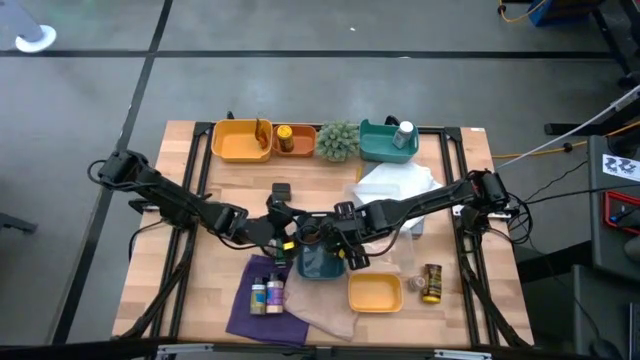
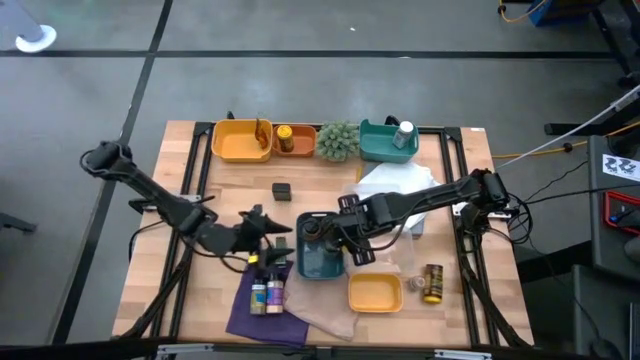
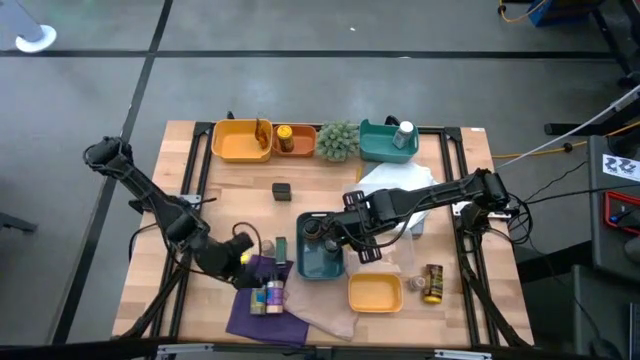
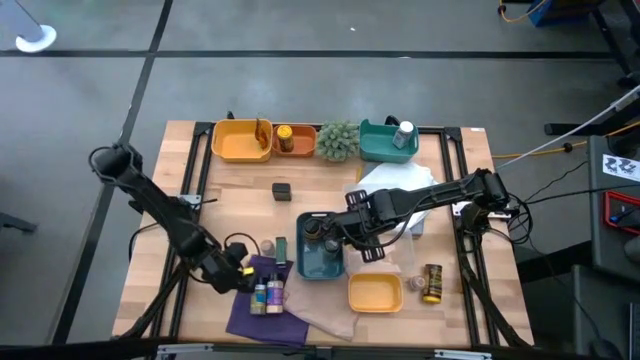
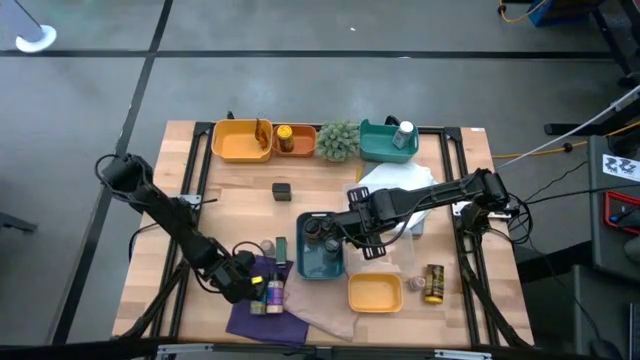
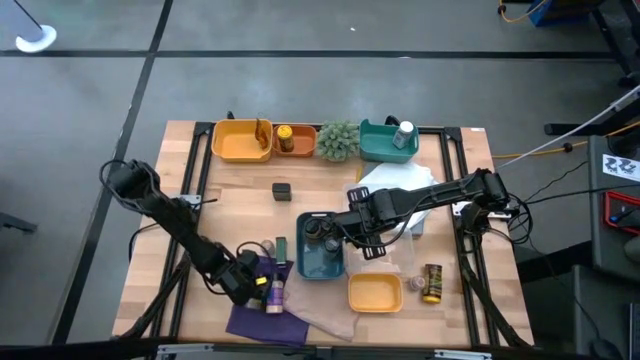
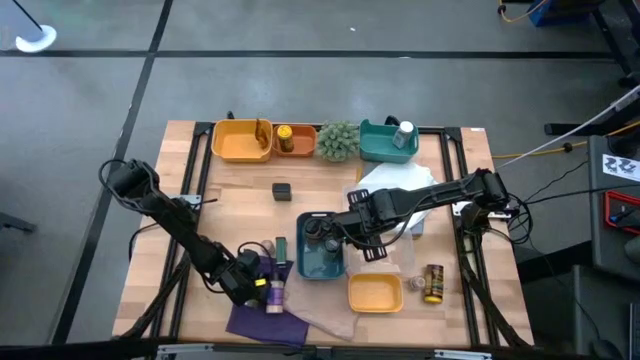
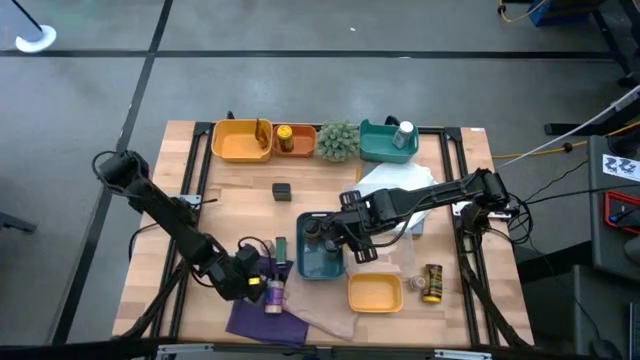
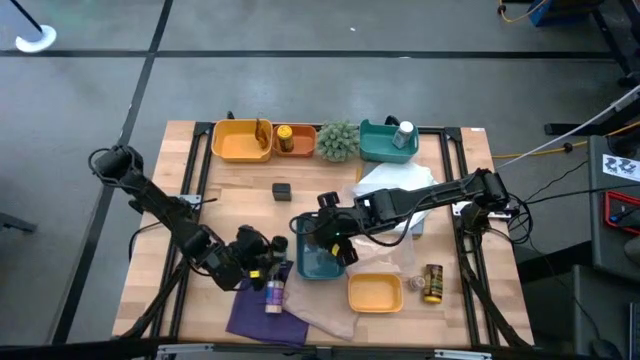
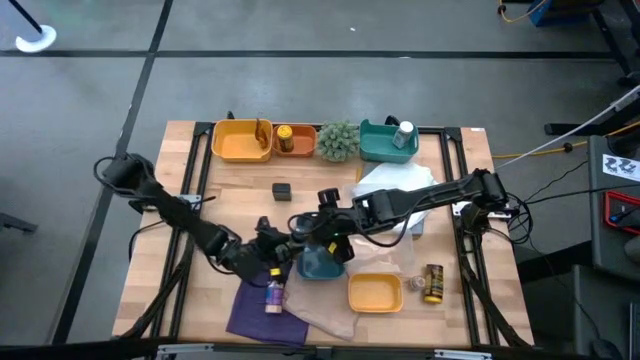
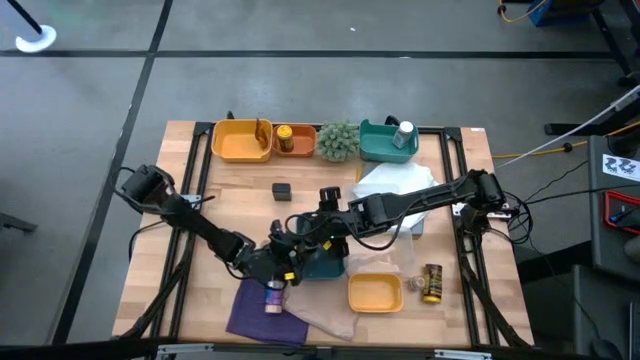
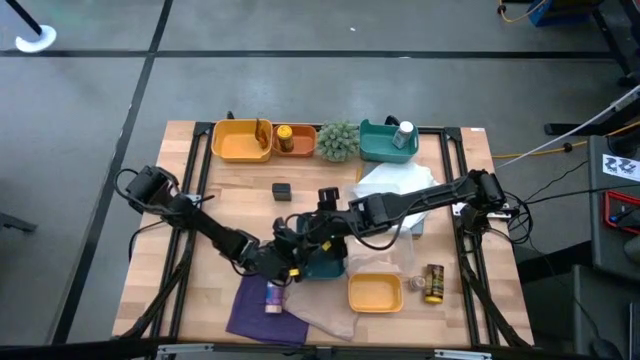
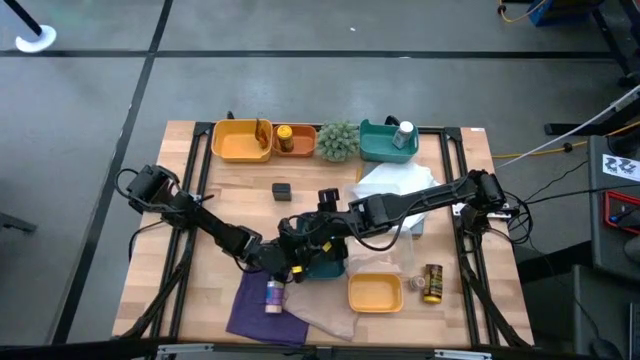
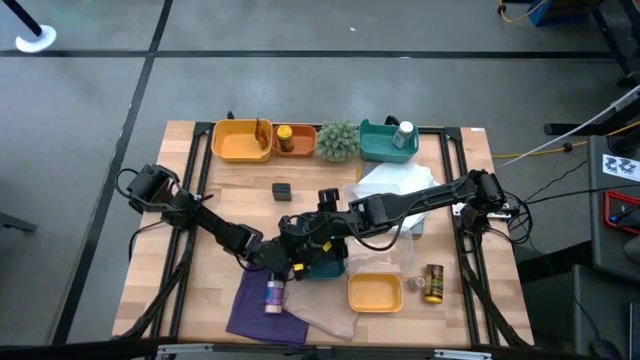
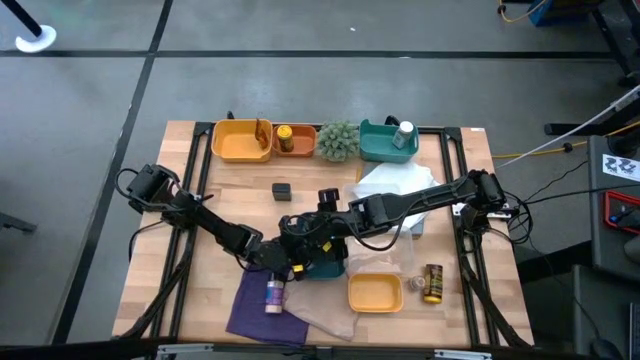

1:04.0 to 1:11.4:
Task: Sort spices by type
Put the left black seasoning bottle into the blue bin

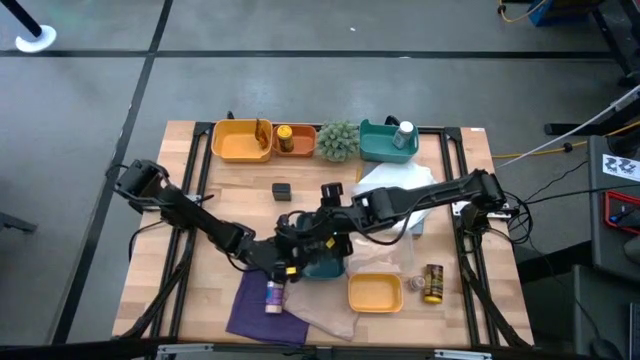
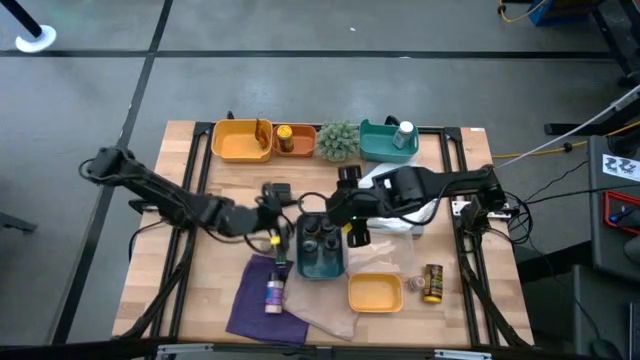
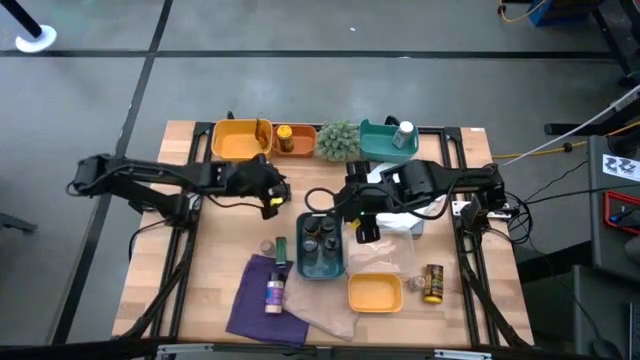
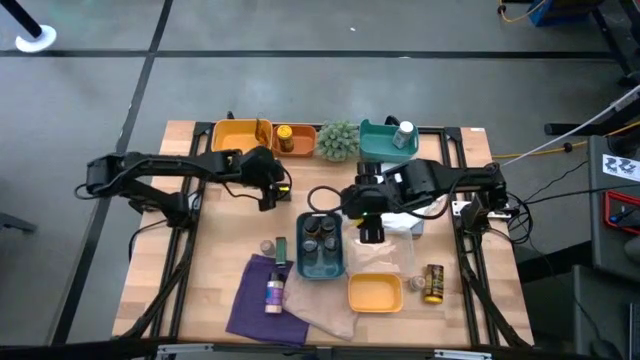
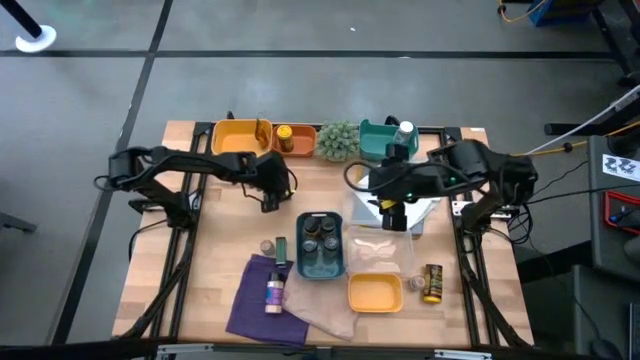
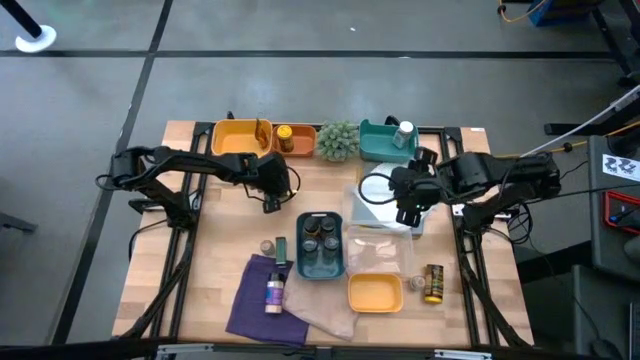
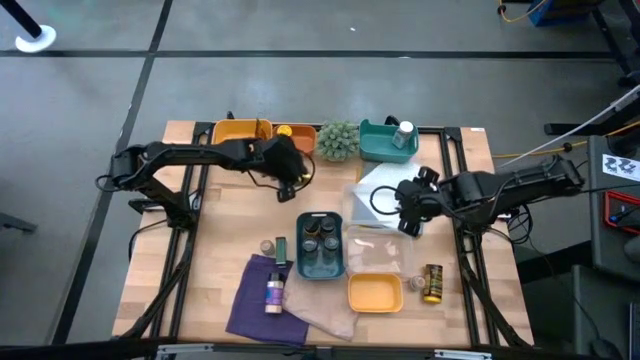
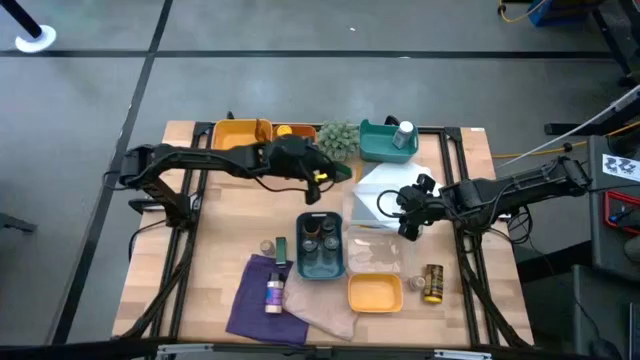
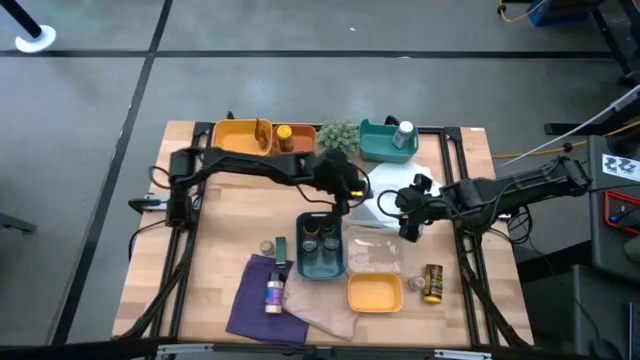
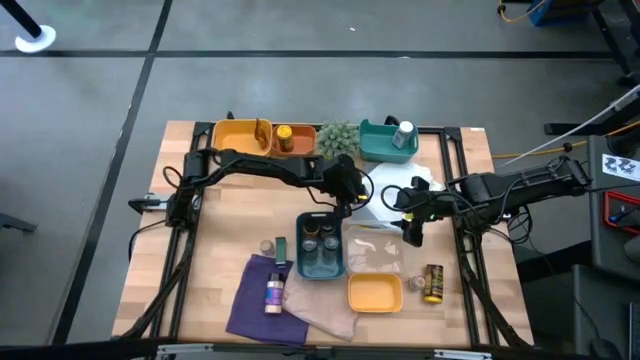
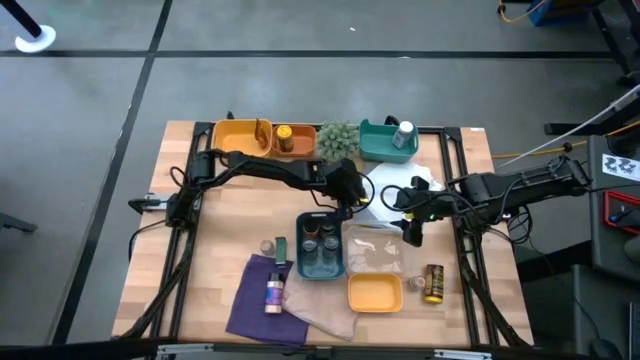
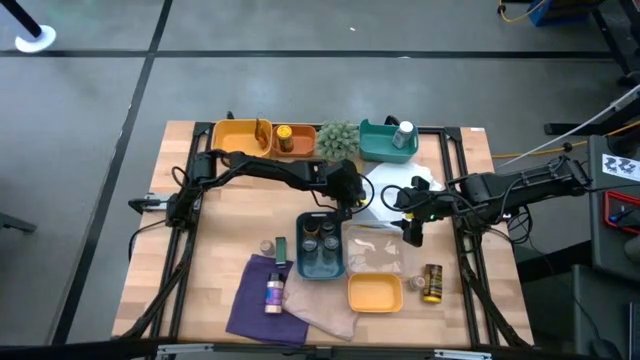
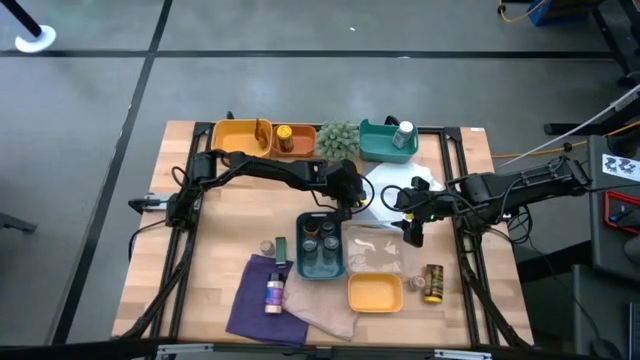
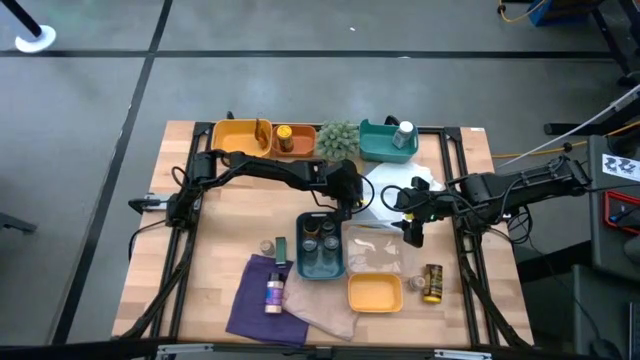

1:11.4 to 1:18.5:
Put the top black seasoning can into the top transparent bin

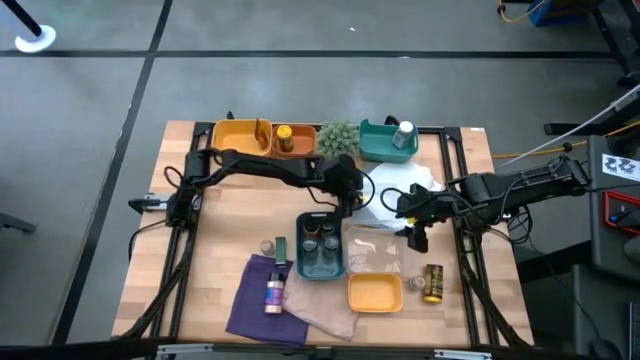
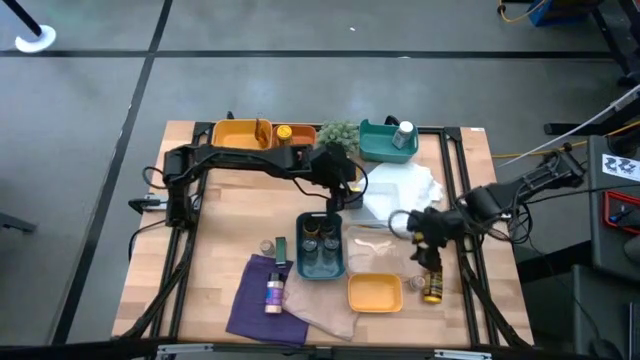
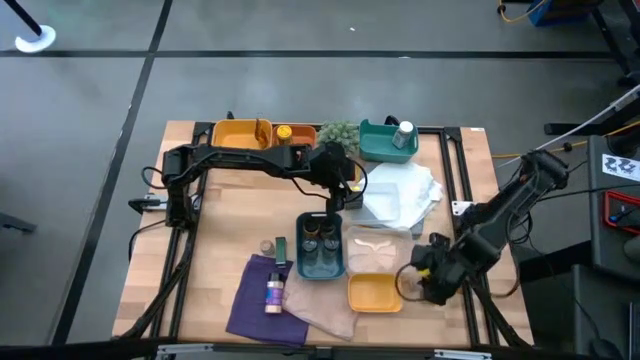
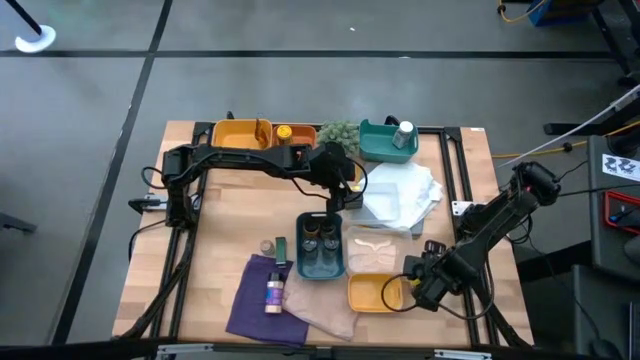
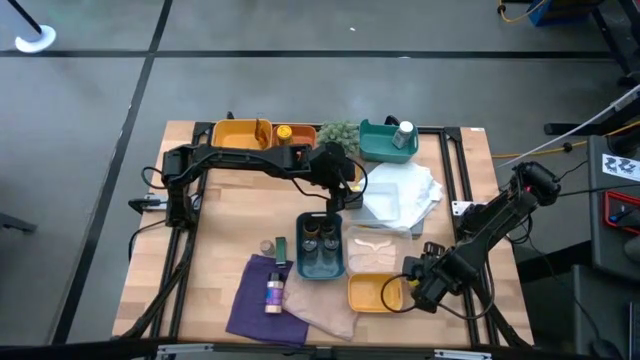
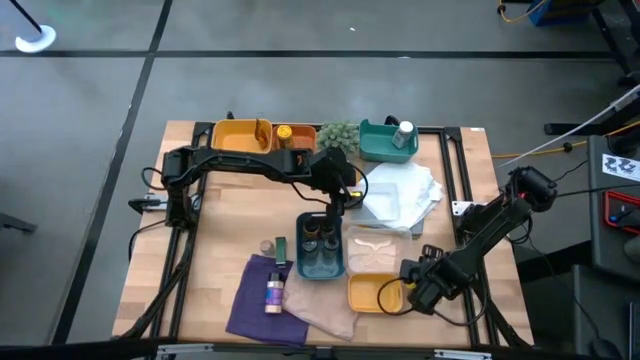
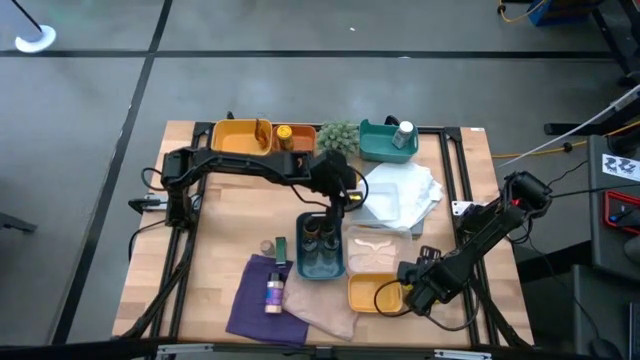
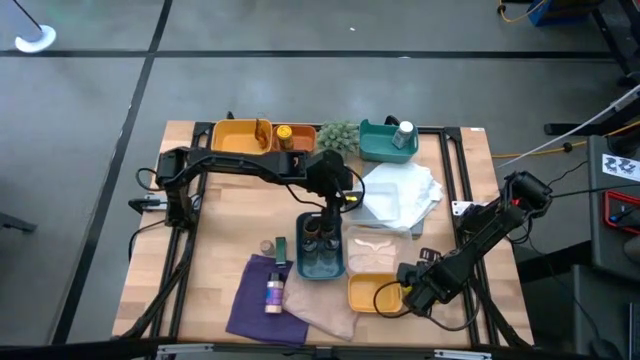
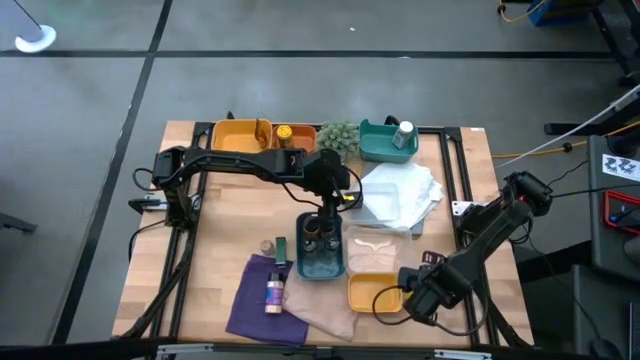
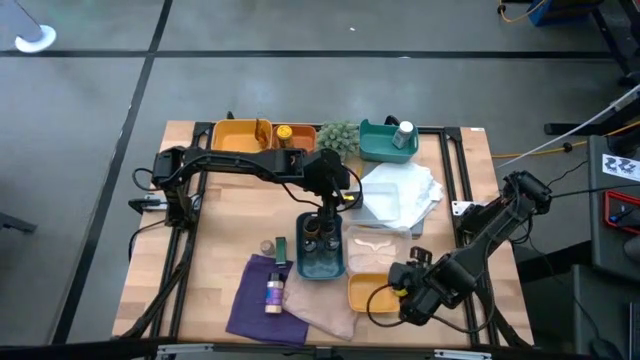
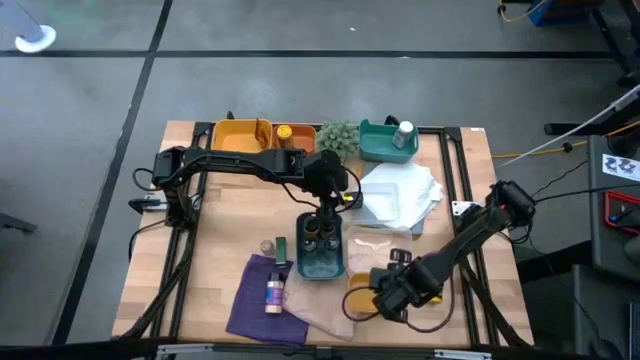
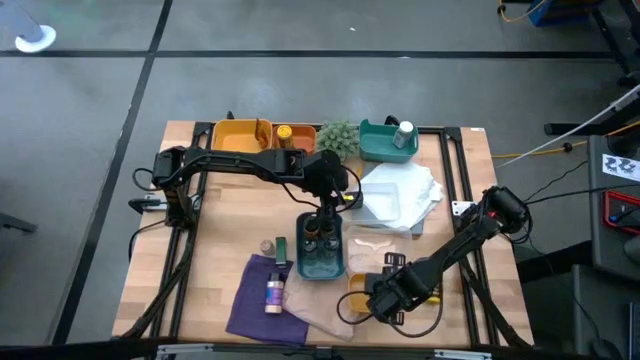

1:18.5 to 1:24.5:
Put the right brown seasoning bottle into the bottom yellow bin
